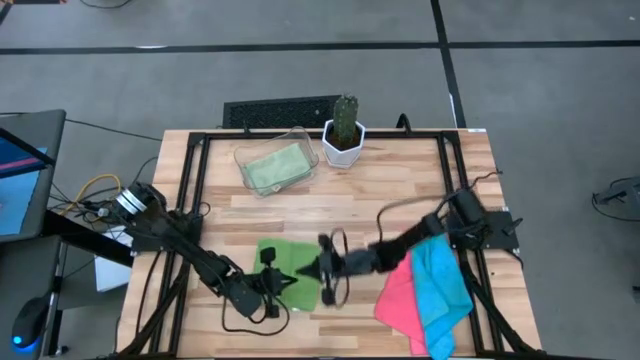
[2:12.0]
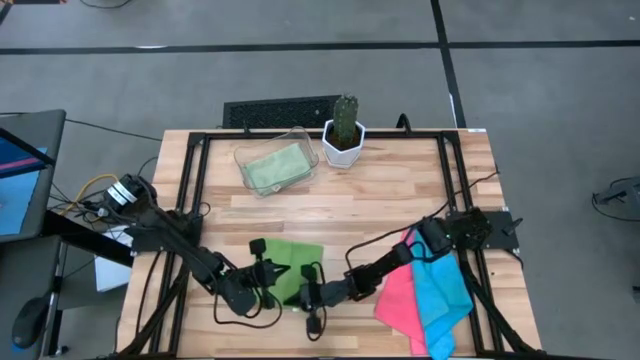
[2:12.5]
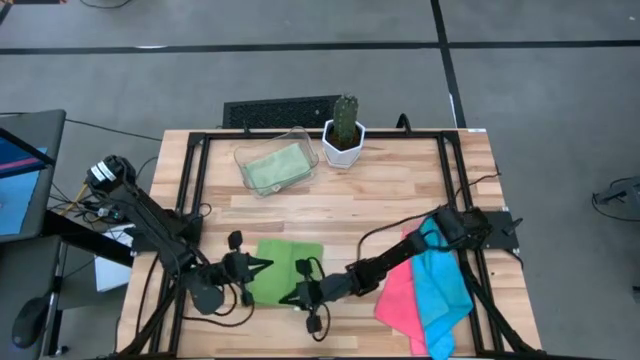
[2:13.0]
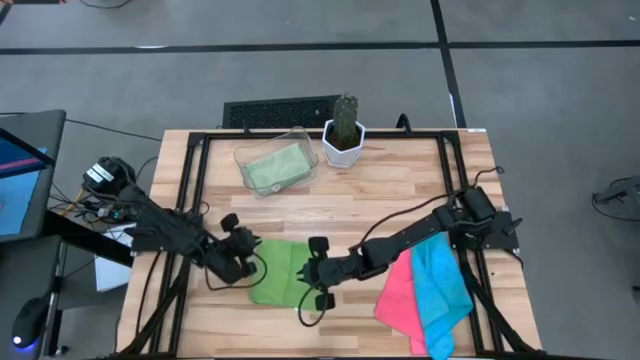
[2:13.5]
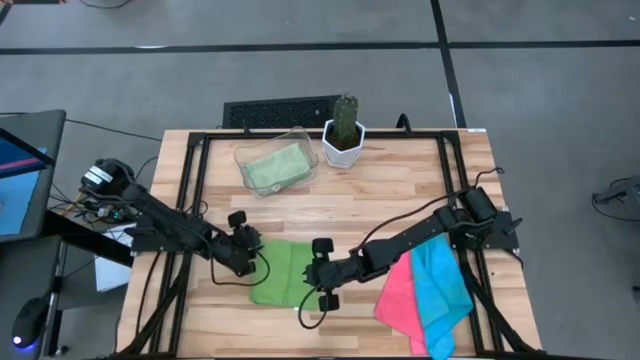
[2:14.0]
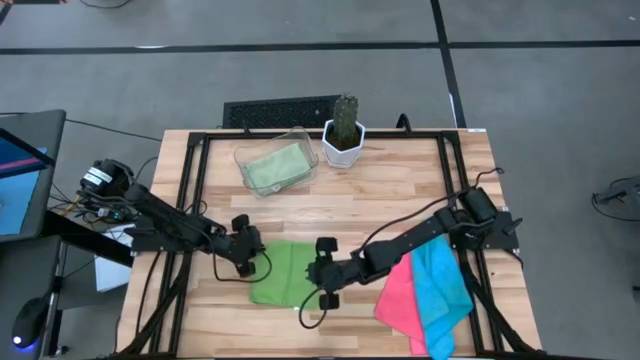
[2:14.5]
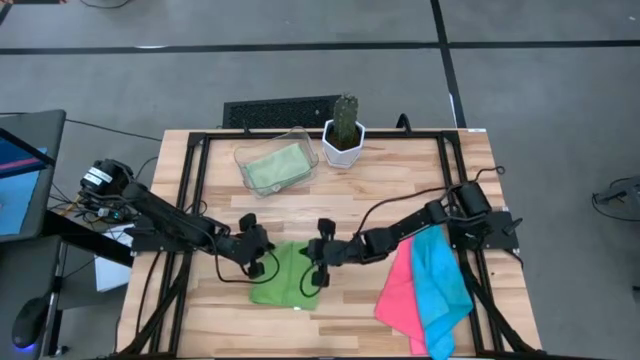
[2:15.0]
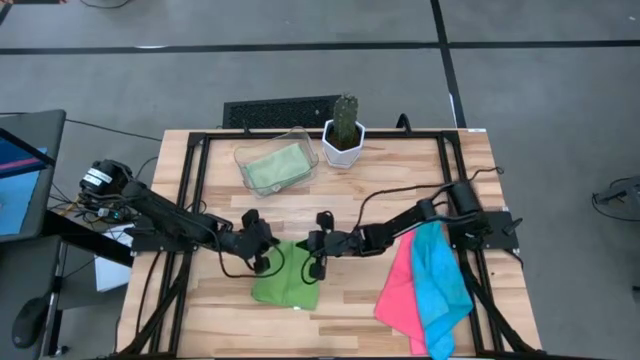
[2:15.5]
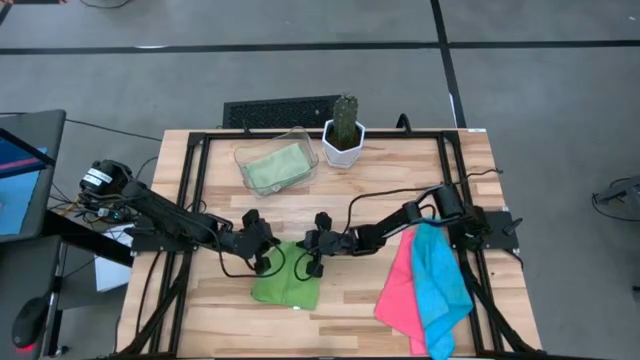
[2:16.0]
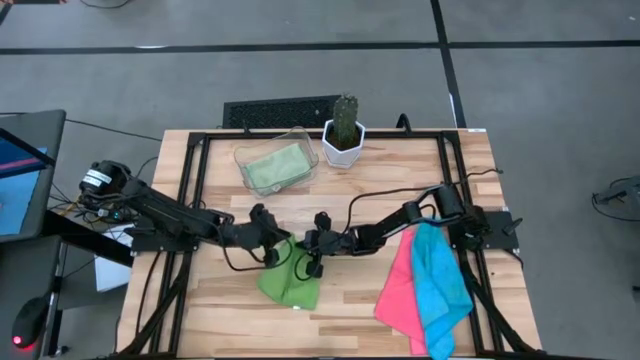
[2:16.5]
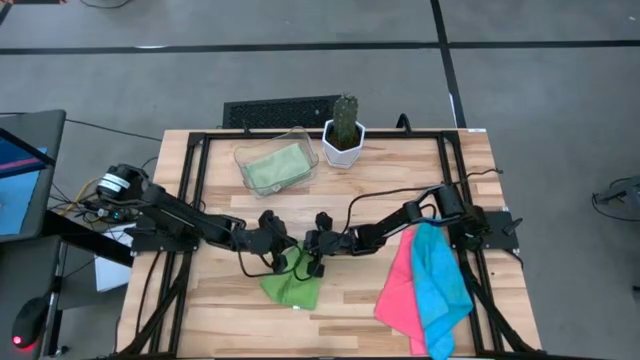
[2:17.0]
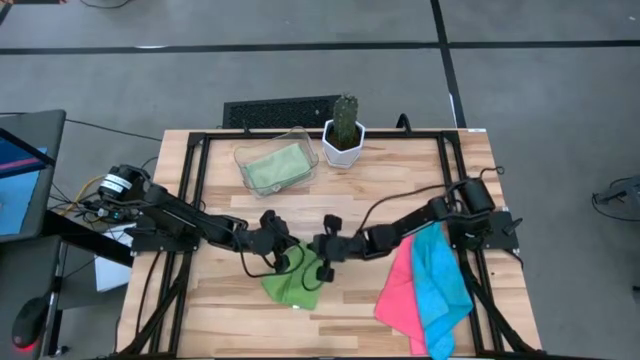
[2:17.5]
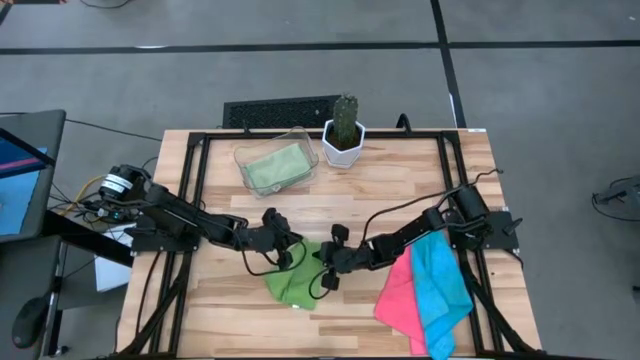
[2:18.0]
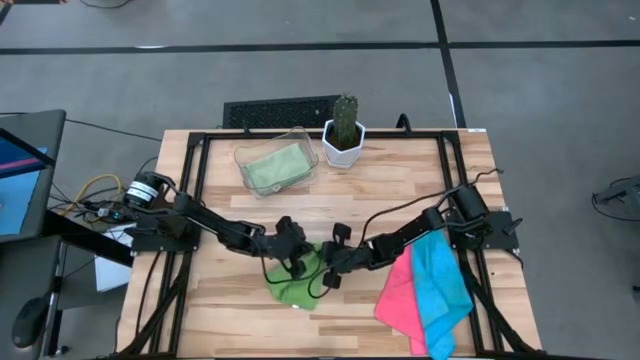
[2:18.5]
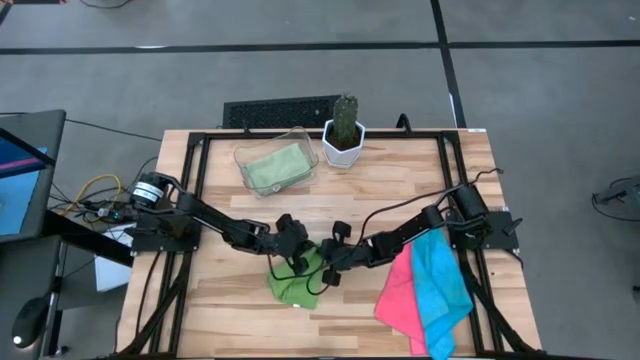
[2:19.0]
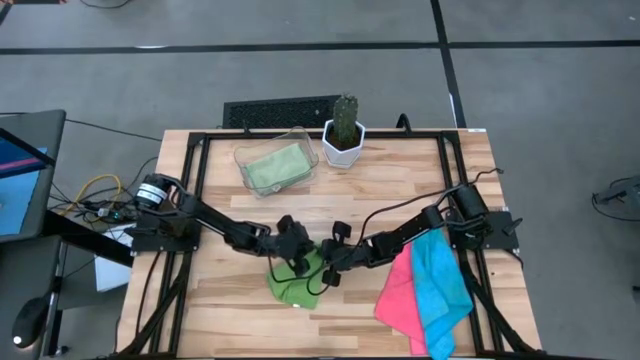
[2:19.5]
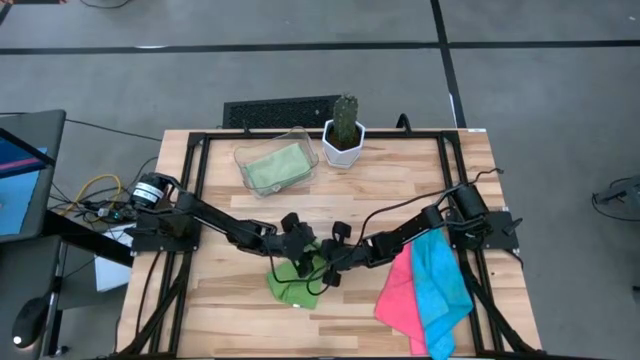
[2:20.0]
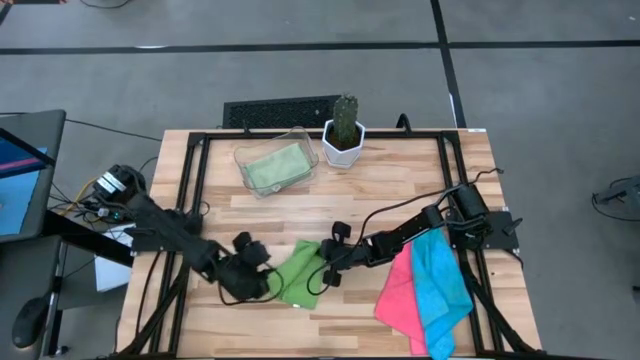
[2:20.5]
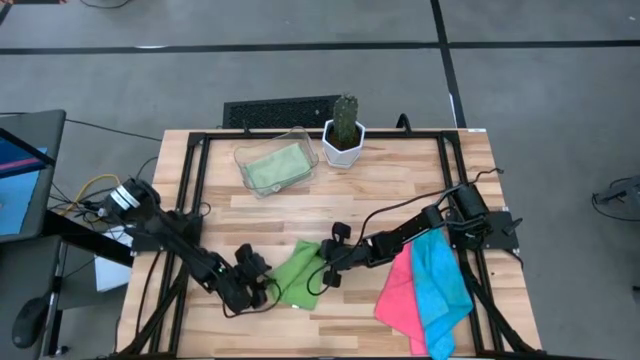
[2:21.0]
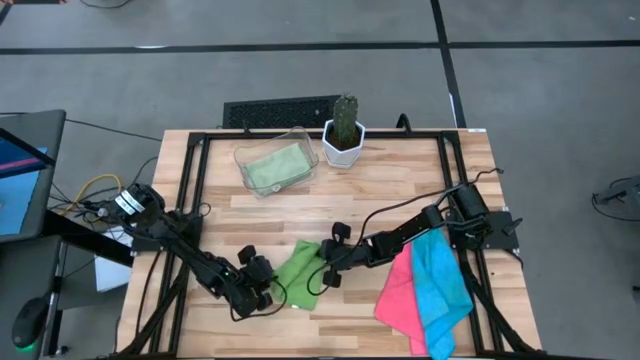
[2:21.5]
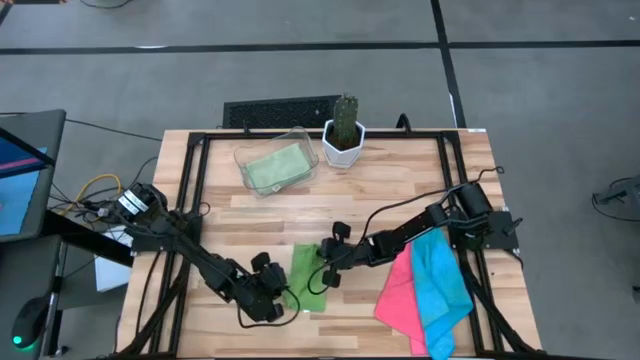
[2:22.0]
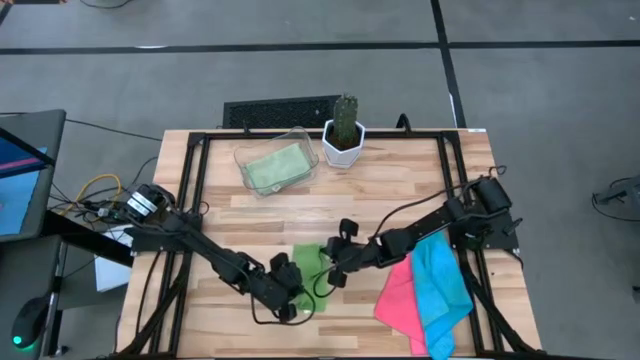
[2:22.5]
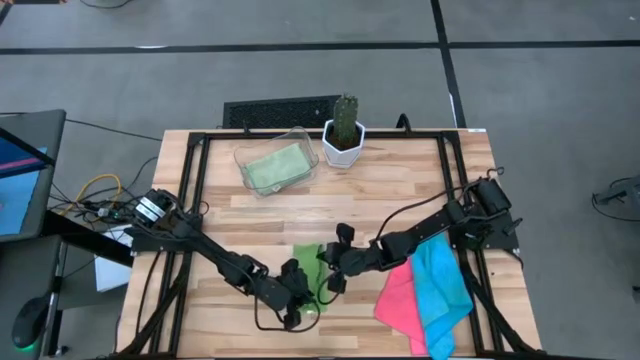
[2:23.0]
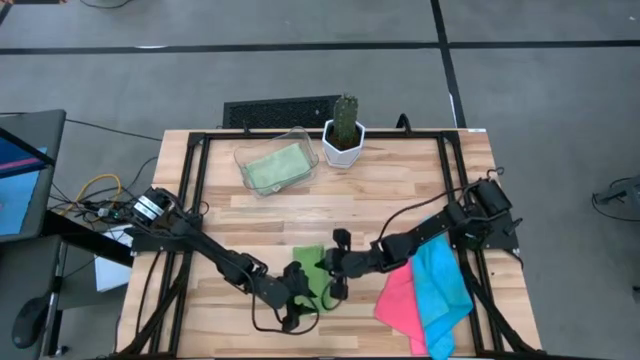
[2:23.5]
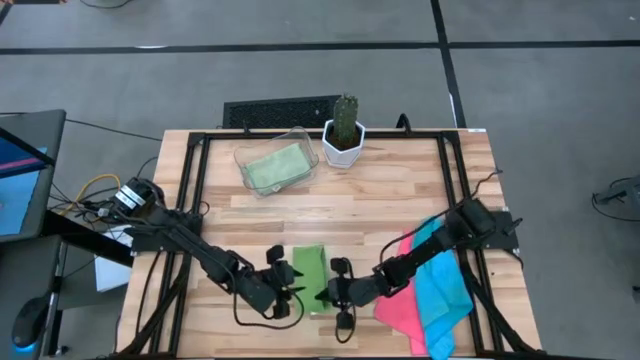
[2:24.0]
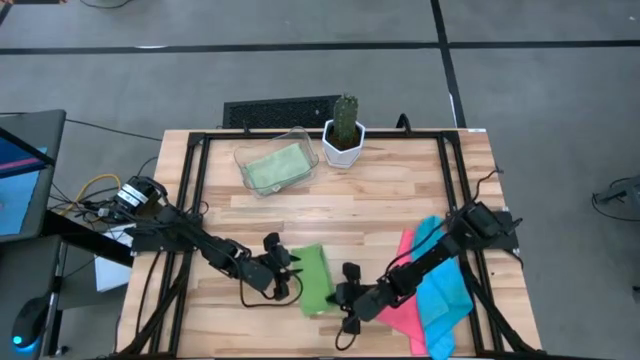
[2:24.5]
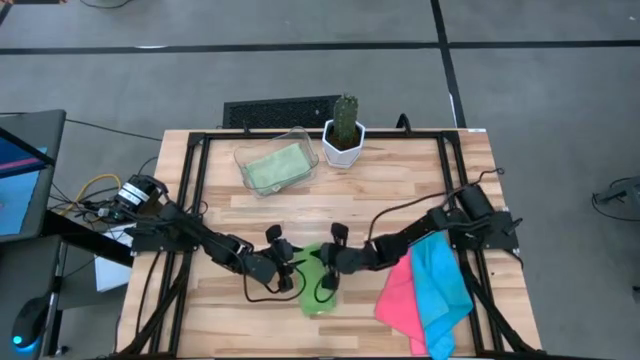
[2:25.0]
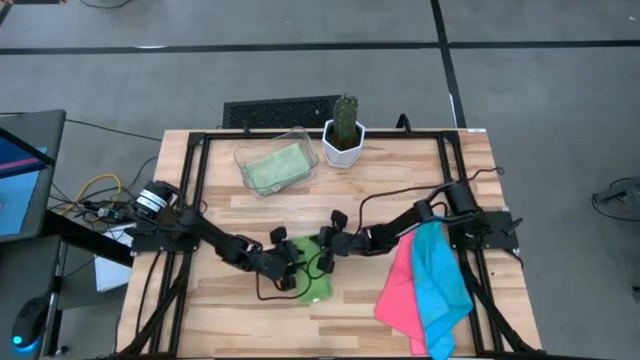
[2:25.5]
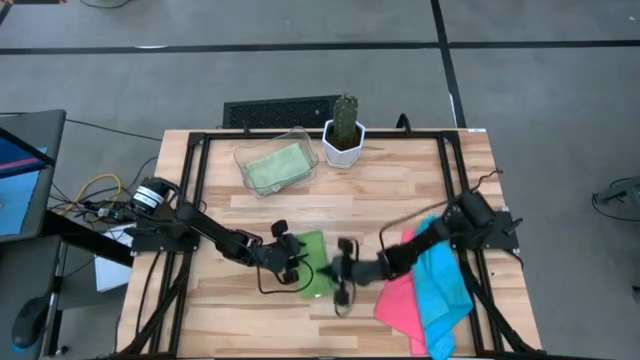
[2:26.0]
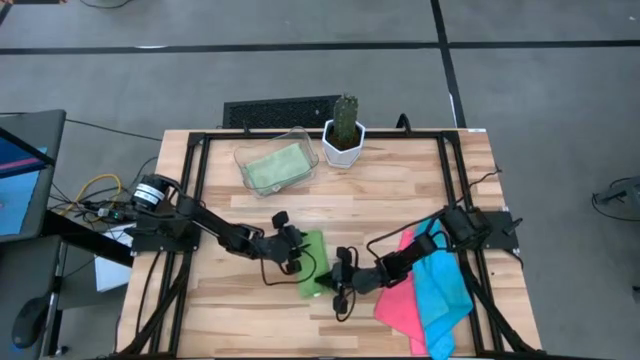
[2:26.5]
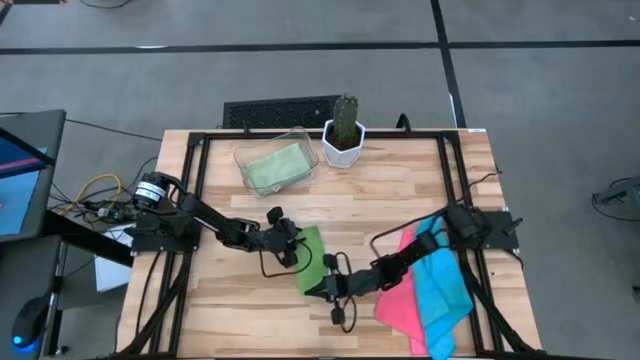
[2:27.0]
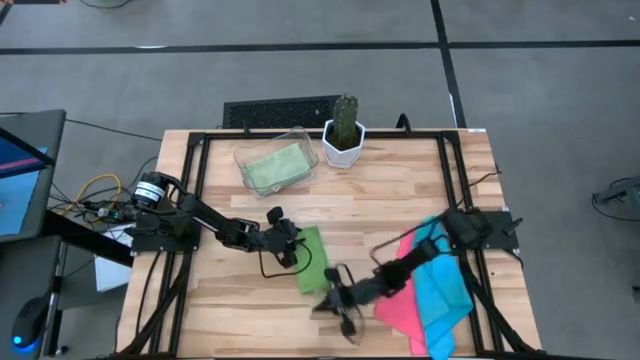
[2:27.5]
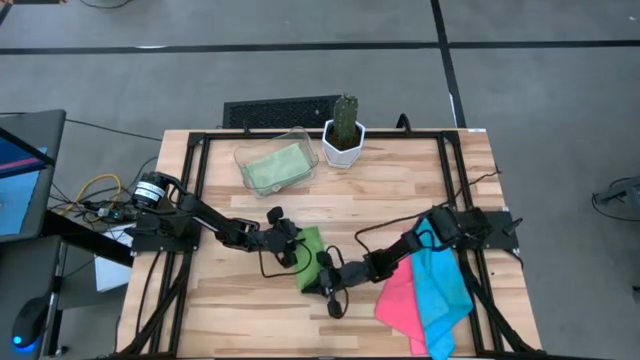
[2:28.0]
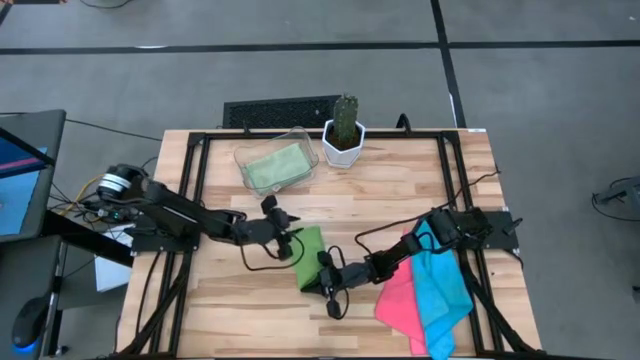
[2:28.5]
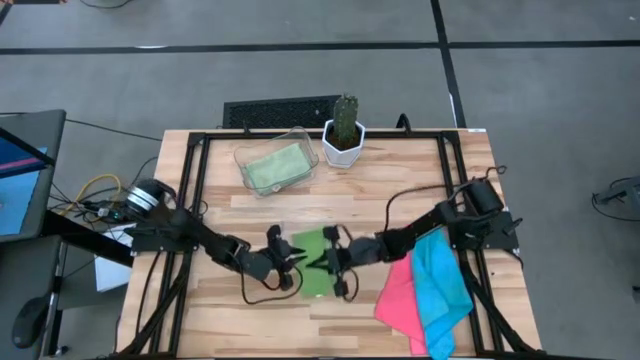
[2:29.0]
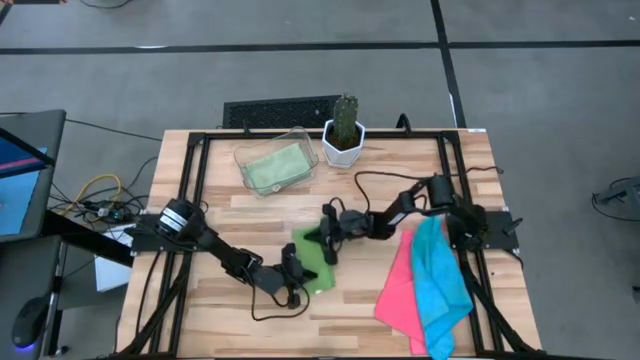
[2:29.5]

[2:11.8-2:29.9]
Task: Fold microfiber towels
Fold the green microfiber towel

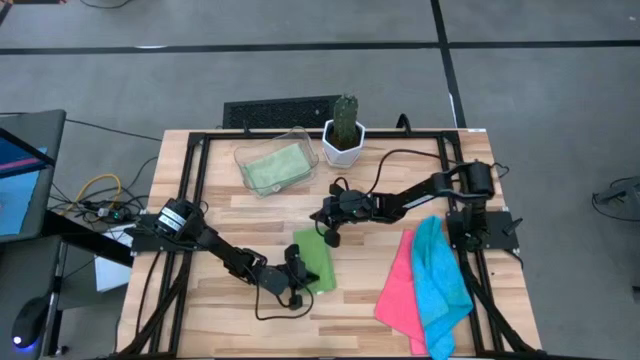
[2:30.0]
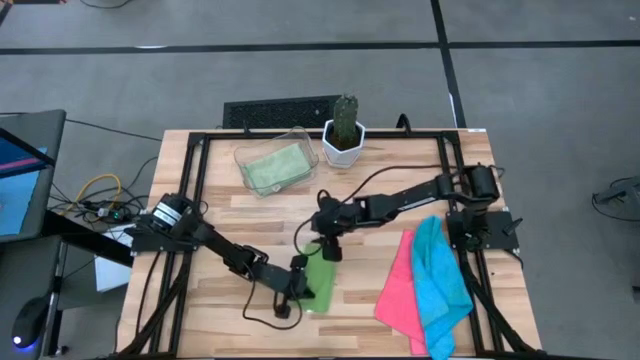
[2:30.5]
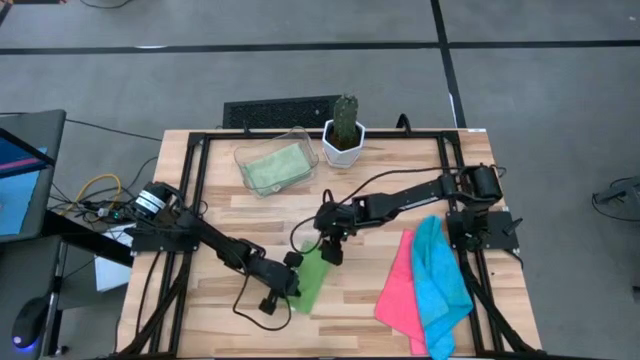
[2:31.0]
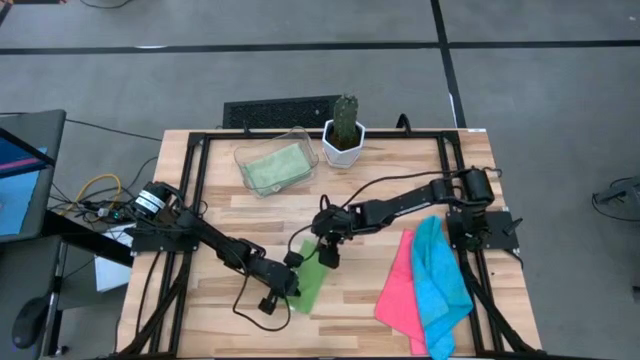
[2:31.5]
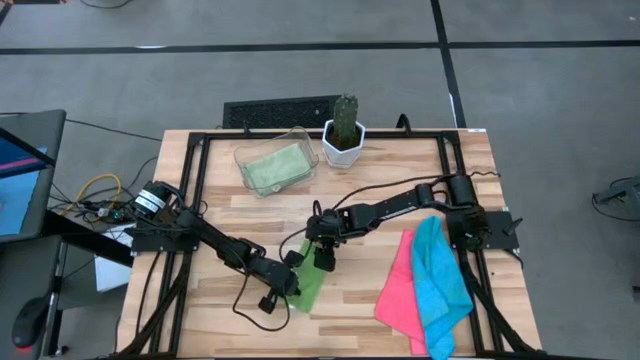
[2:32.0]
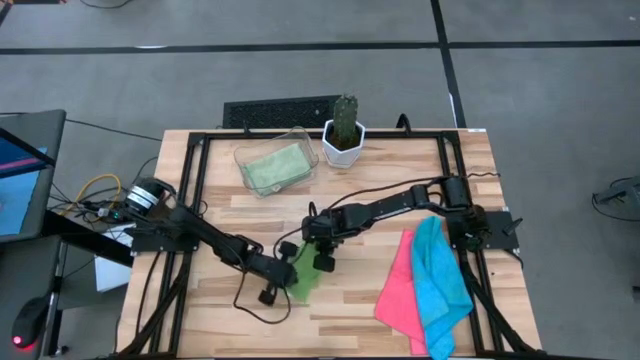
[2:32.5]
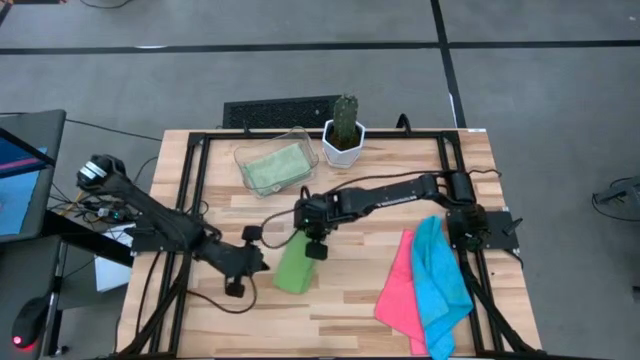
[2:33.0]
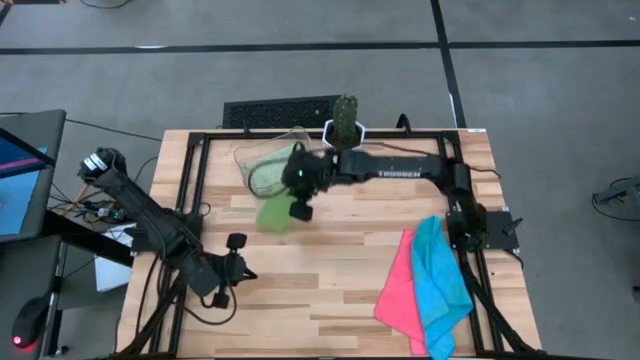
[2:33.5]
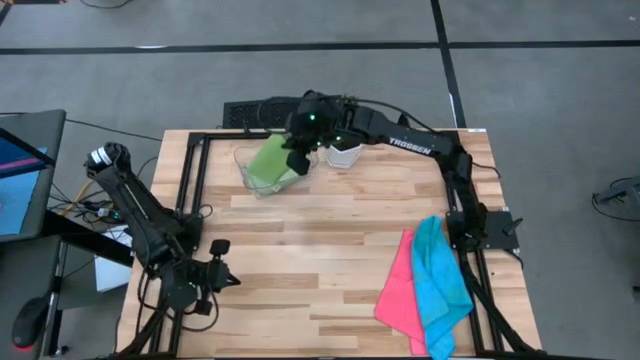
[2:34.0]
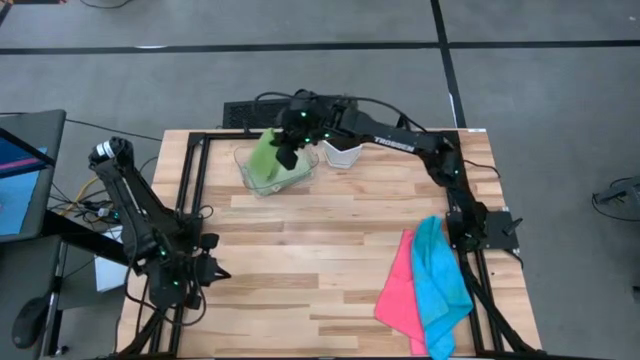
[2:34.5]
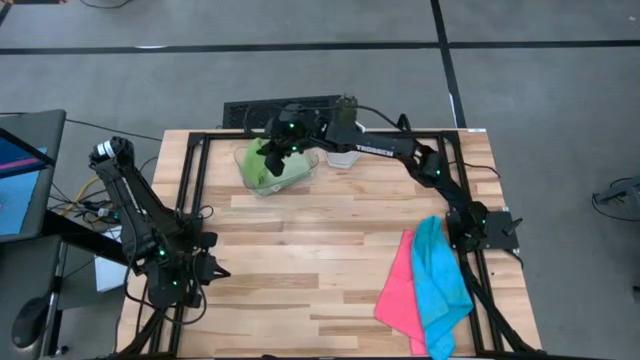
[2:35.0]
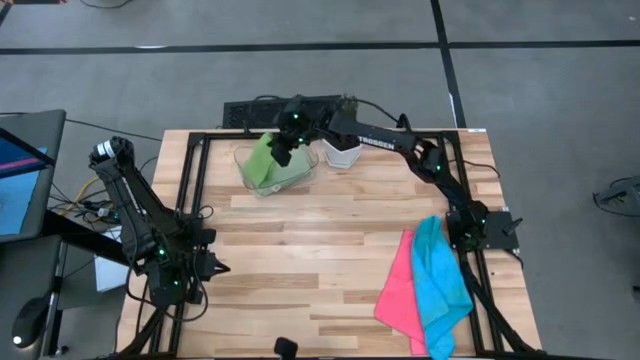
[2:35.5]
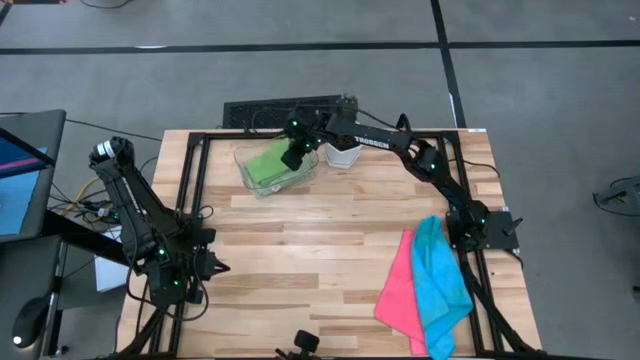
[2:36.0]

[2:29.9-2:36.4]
Put the green microfiber towel into the transparent bin
